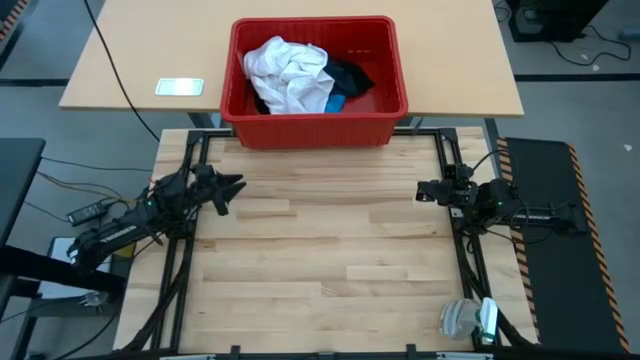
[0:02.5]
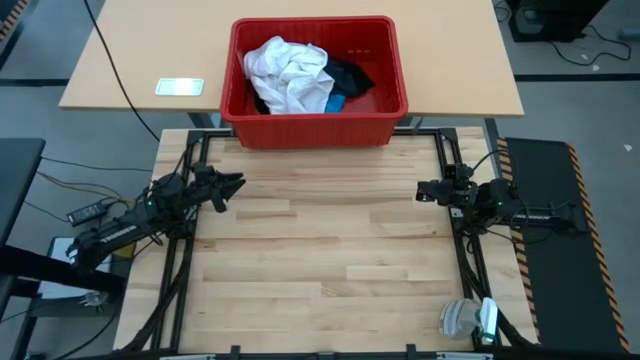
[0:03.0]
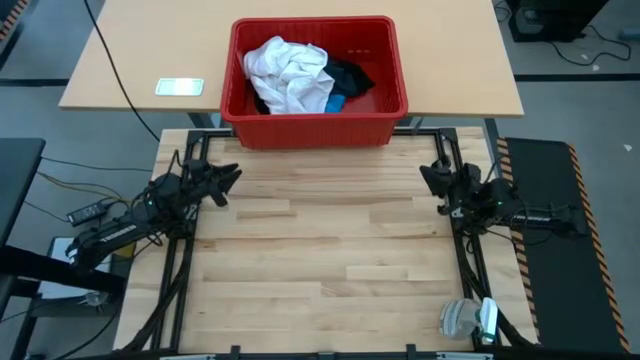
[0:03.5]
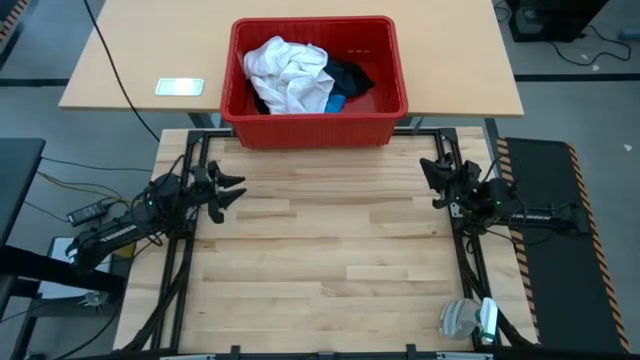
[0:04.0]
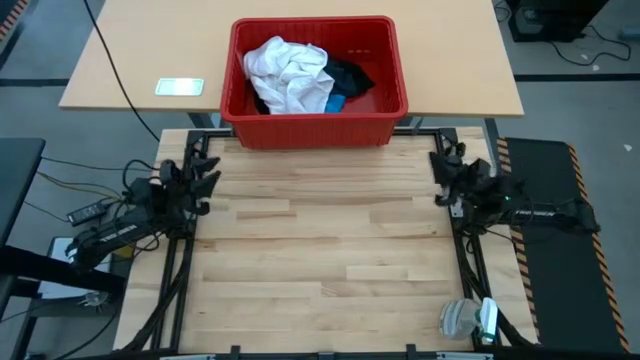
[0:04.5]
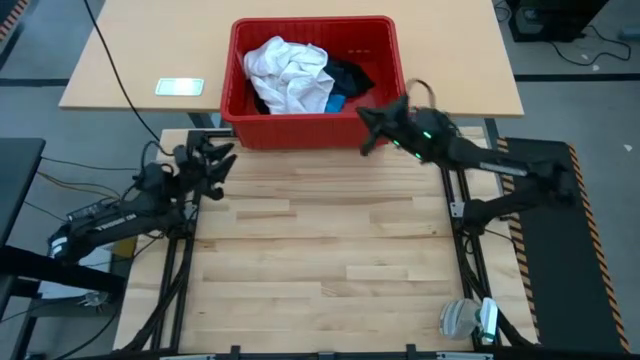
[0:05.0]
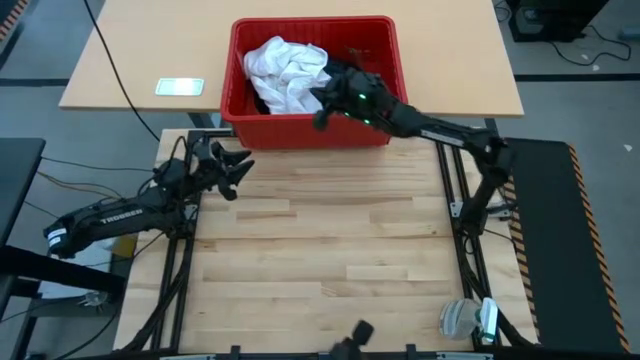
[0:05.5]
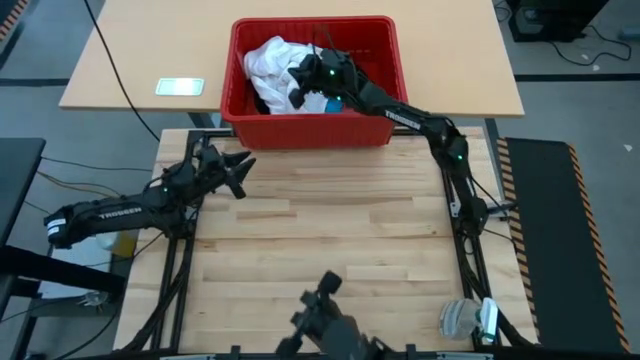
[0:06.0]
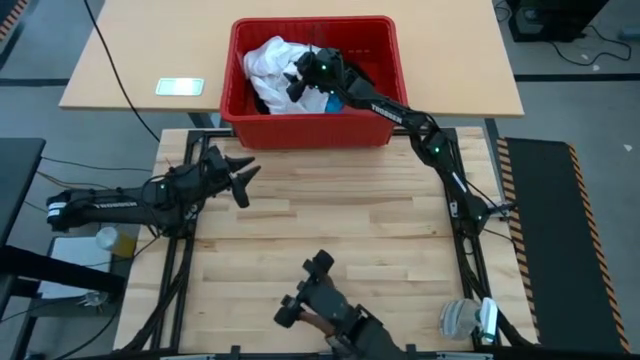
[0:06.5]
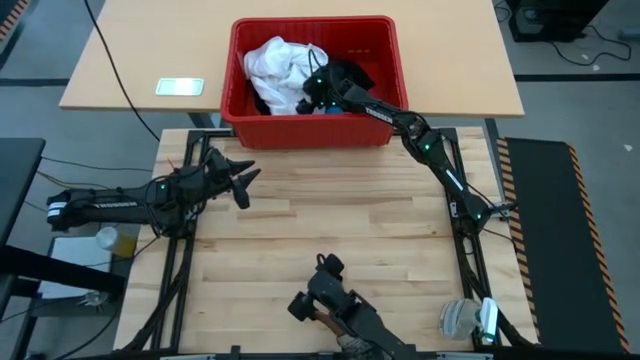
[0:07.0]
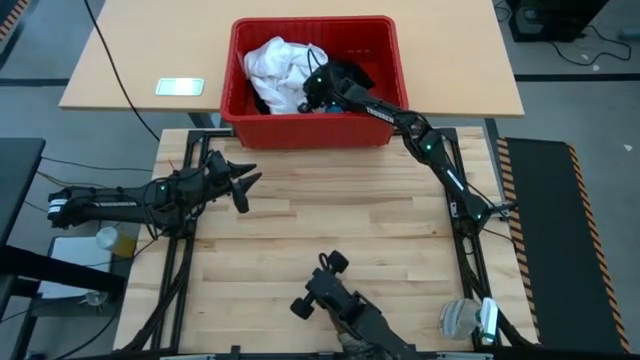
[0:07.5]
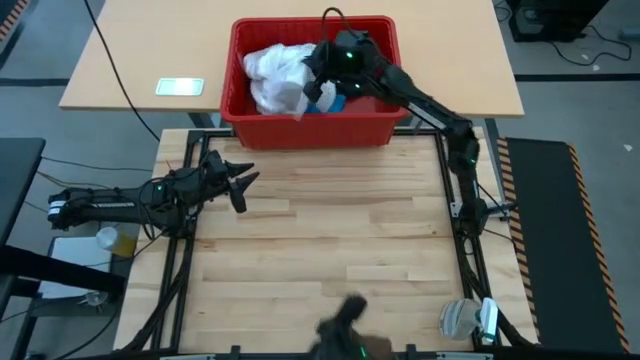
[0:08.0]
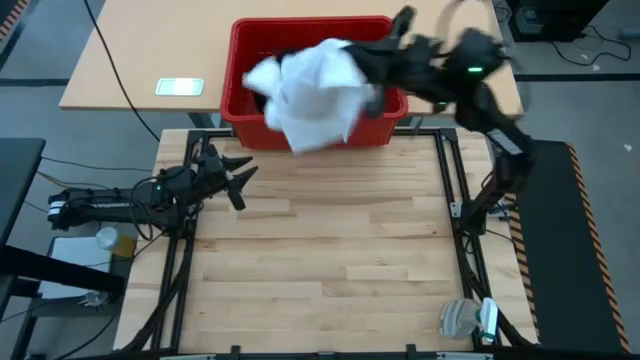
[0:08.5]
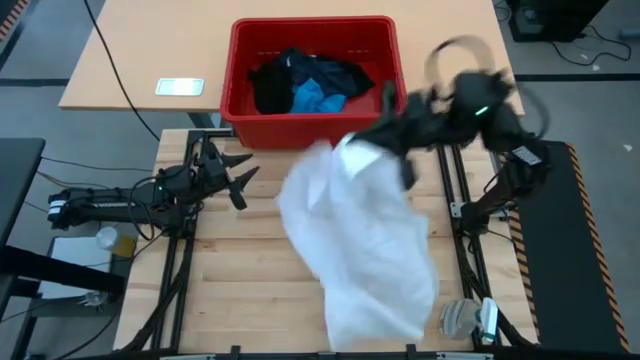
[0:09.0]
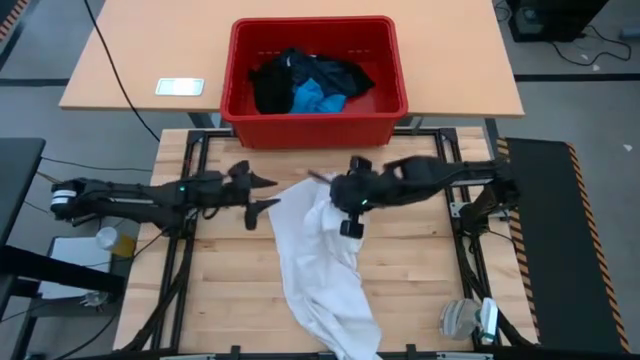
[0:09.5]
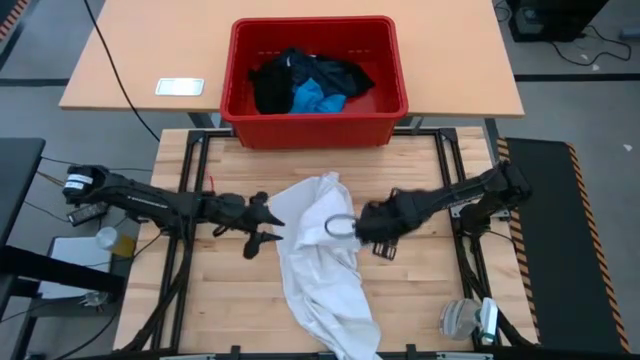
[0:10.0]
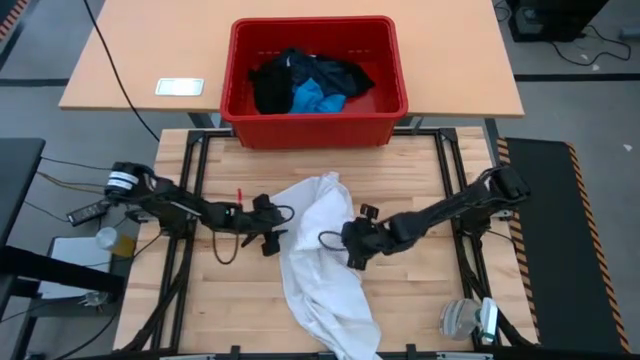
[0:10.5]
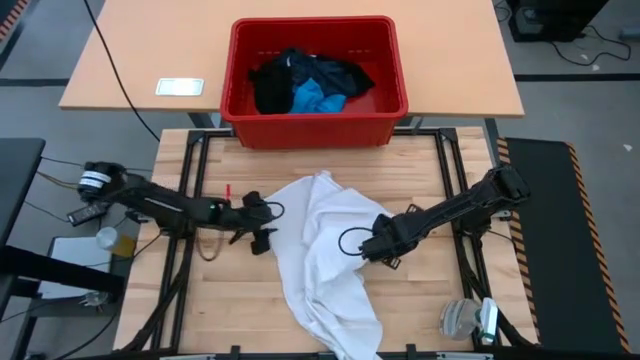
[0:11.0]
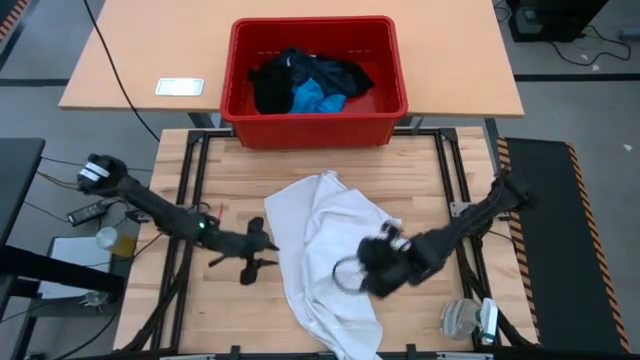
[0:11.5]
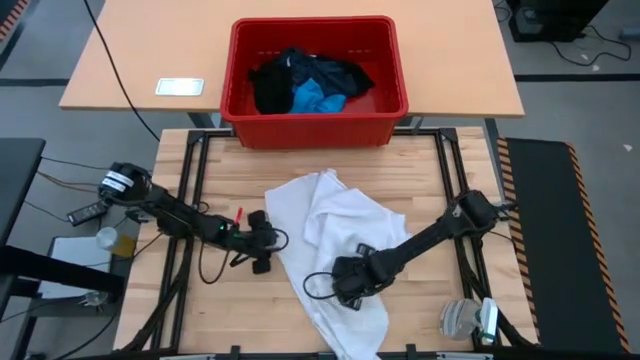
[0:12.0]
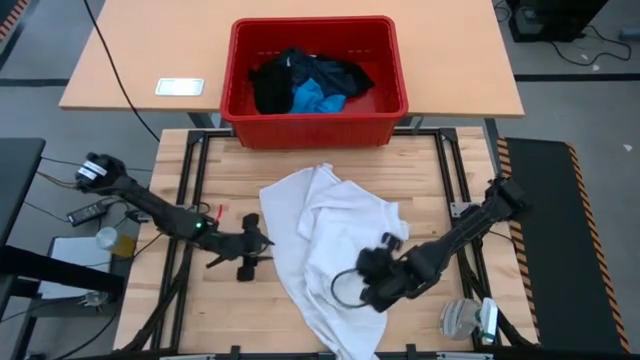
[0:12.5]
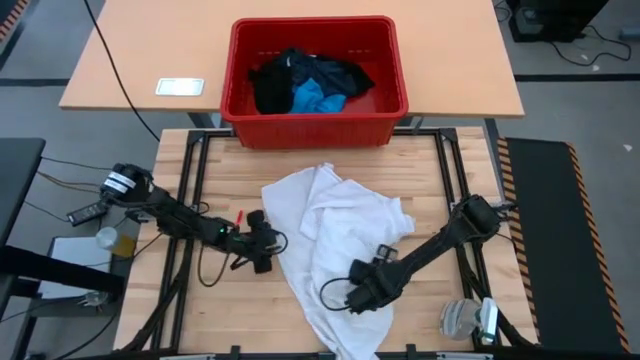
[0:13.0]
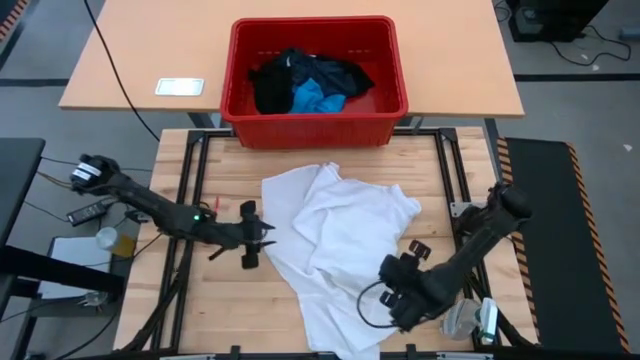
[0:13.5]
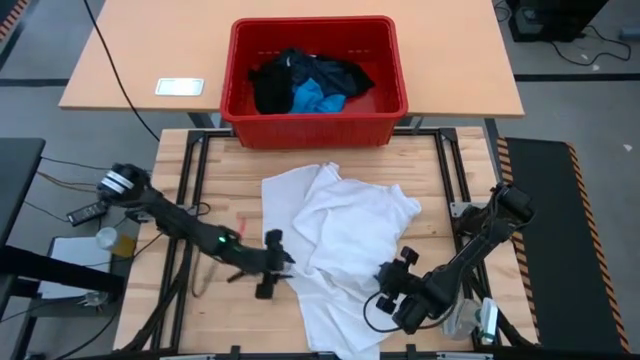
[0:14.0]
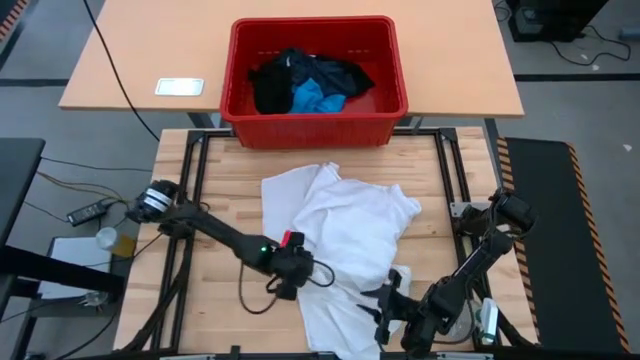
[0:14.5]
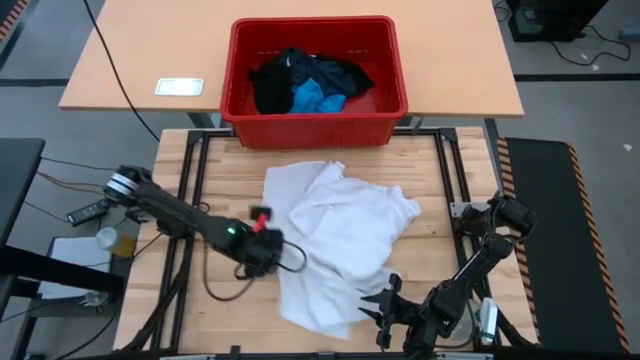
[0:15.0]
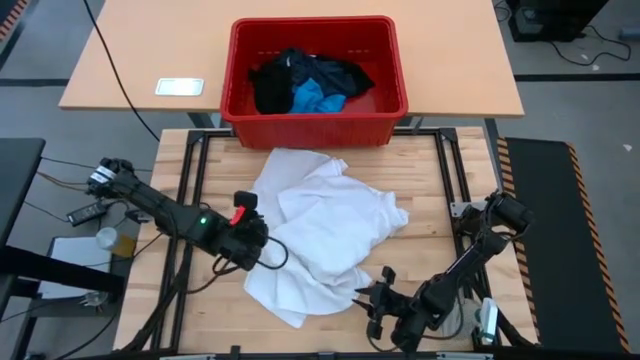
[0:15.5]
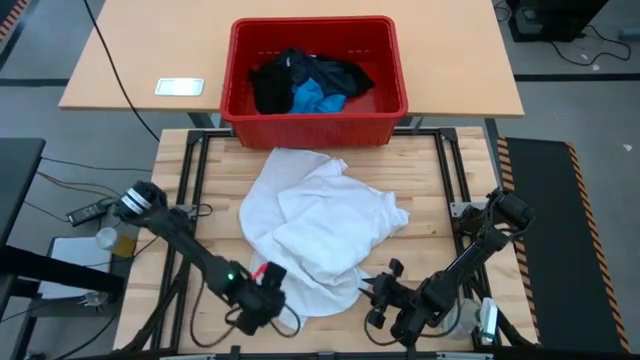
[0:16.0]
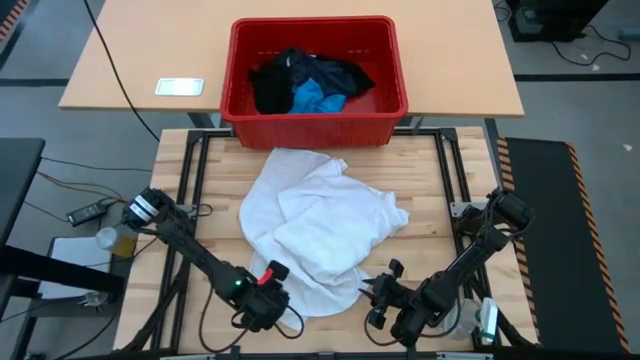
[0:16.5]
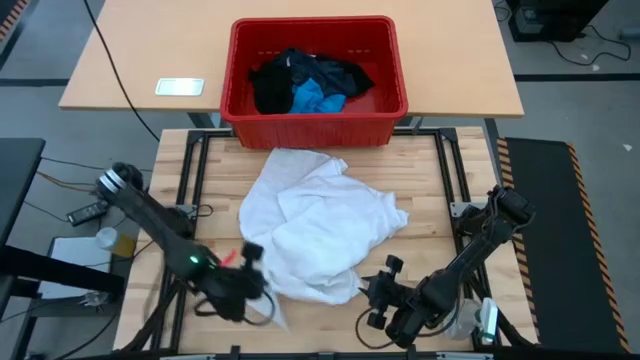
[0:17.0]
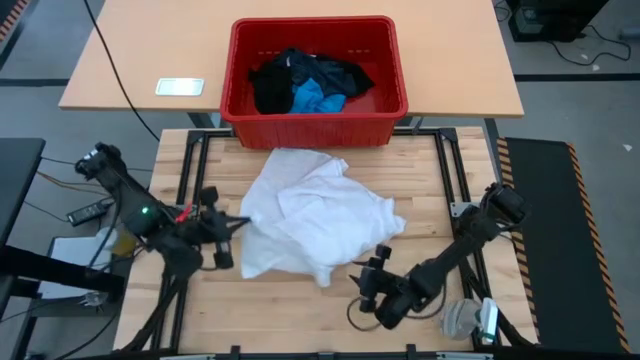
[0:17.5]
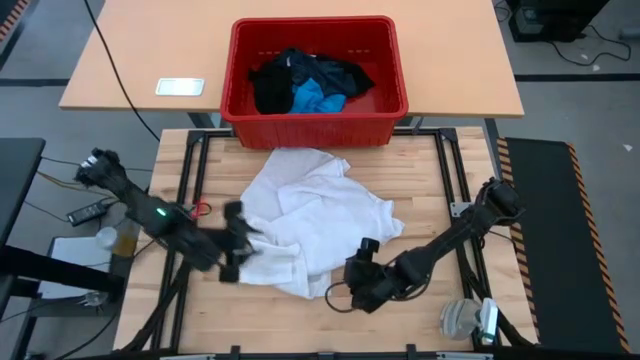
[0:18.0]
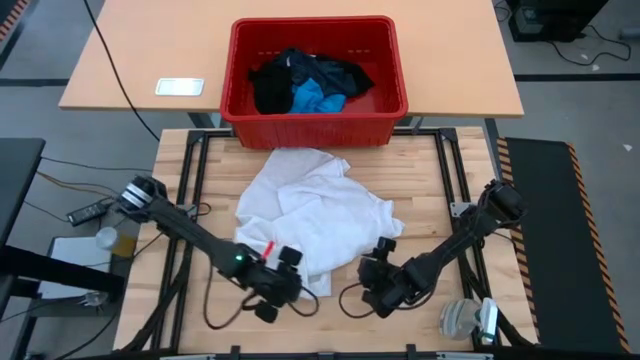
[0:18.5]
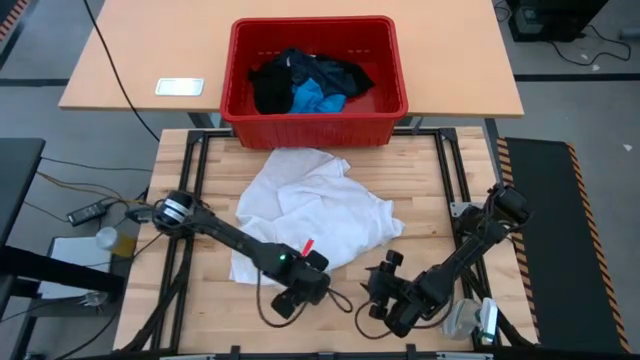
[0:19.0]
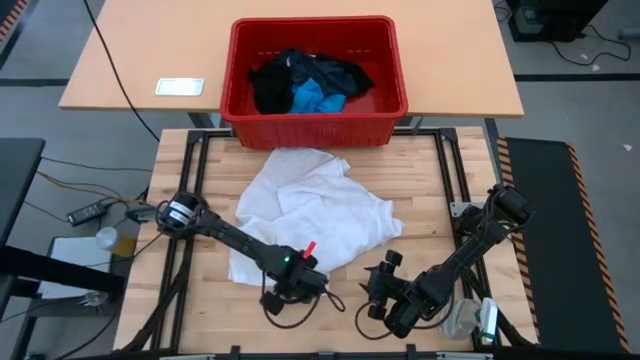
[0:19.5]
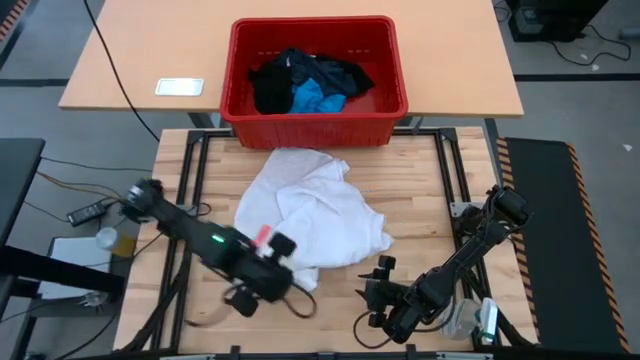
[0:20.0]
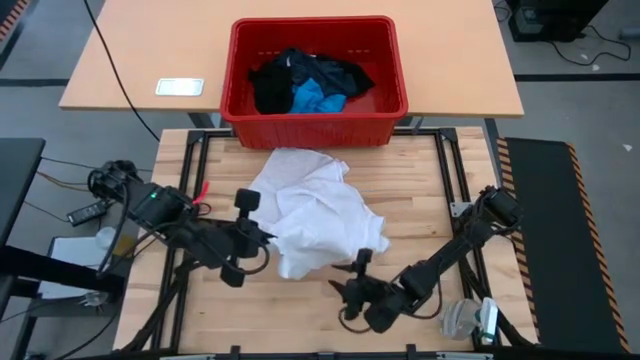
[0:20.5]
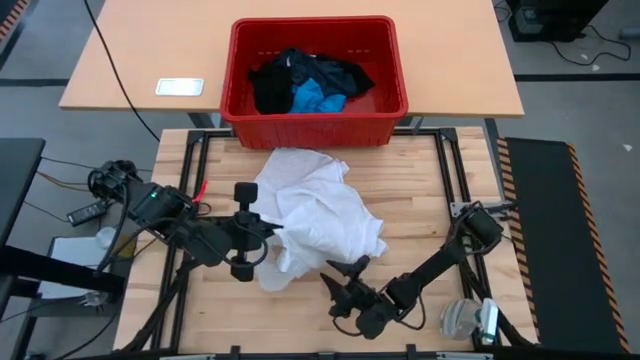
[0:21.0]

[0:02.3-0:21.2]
Task: Fold laundry
Fold the white polo

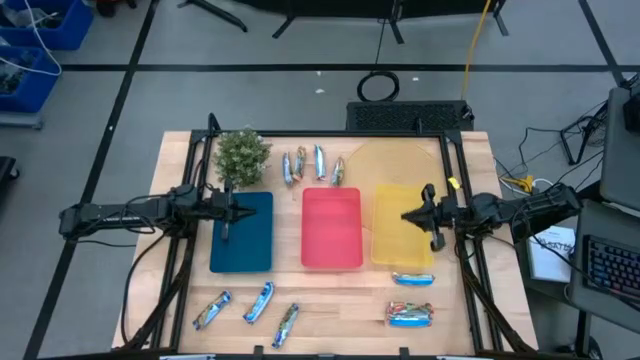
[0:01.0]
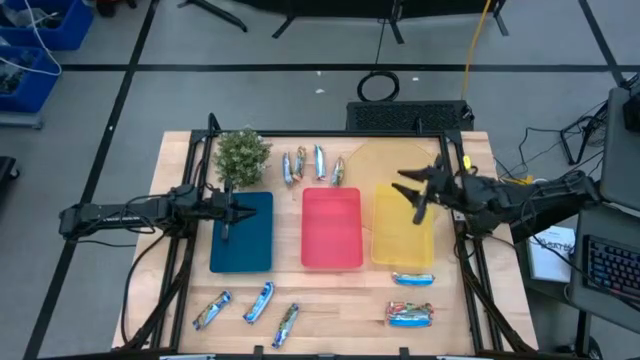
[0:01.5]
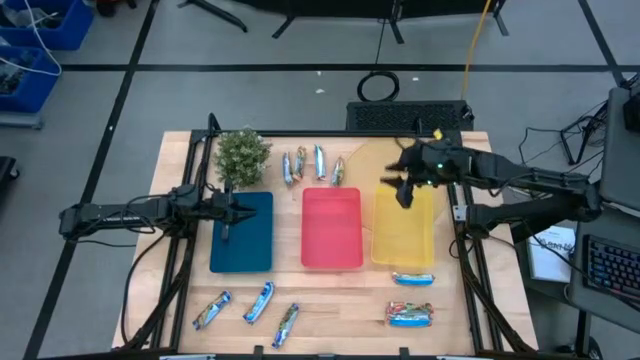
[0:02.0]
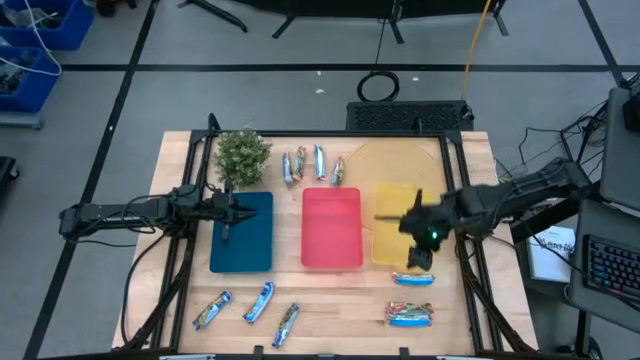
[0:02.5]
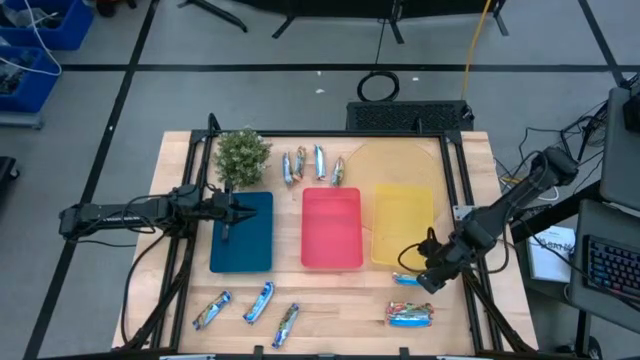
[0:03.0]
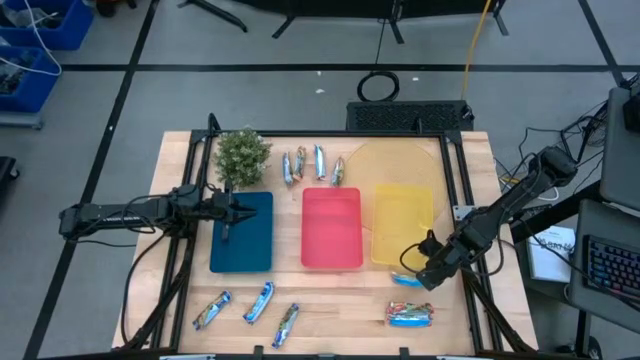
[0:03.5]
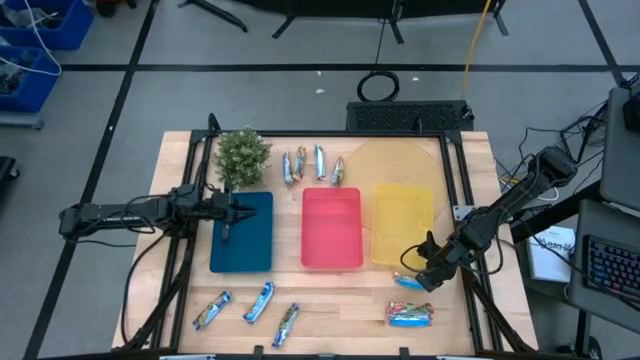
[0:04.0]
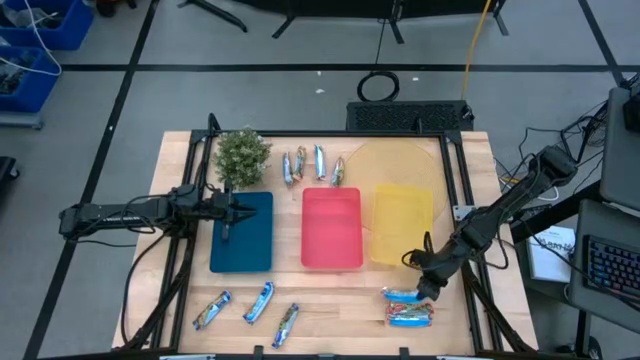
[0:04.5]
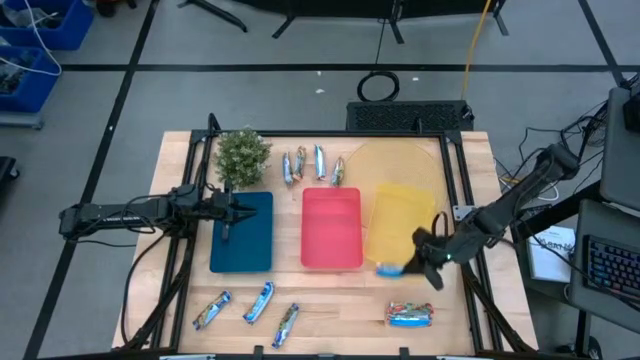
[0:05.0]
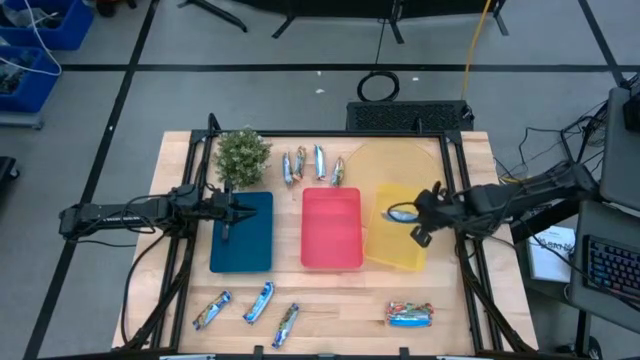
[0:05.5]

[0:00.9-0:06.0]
Task: Pick and place Granola Bars by type
Put the red granola bar into the yellow bin
